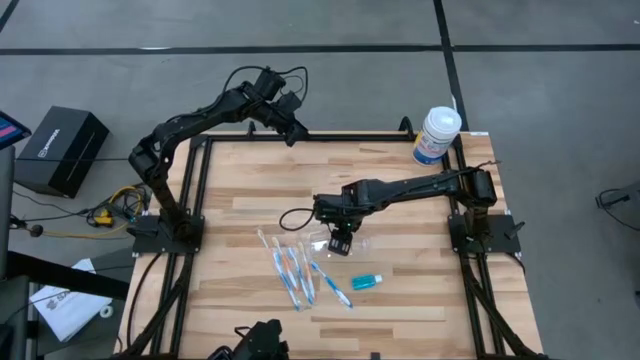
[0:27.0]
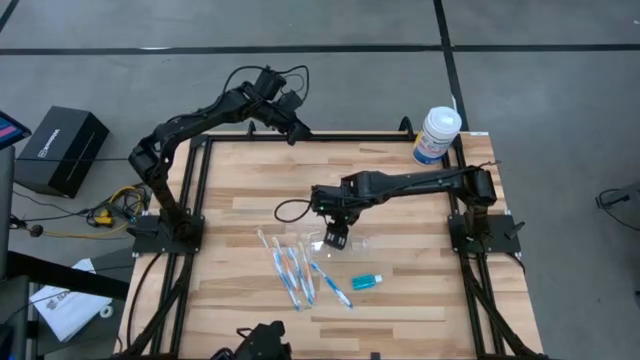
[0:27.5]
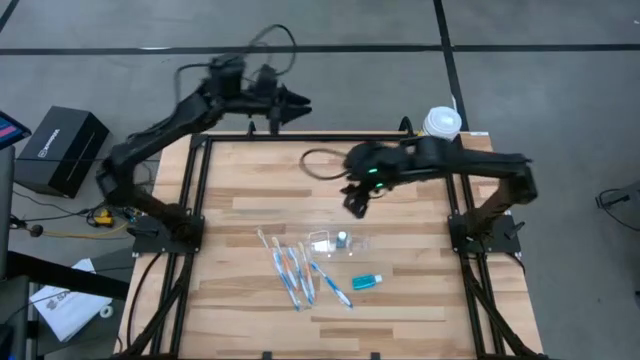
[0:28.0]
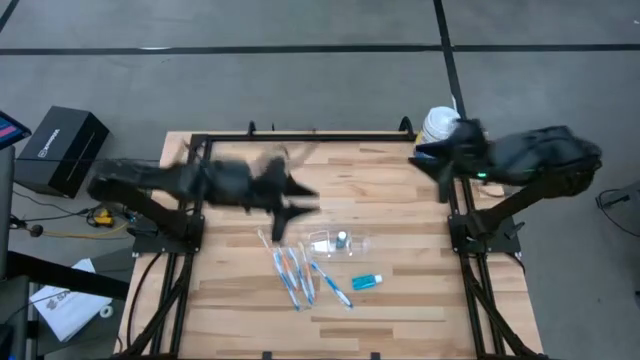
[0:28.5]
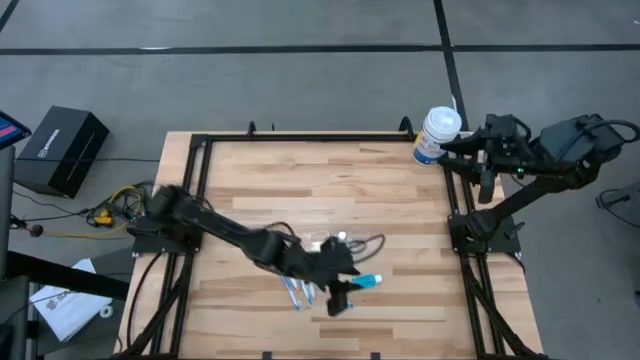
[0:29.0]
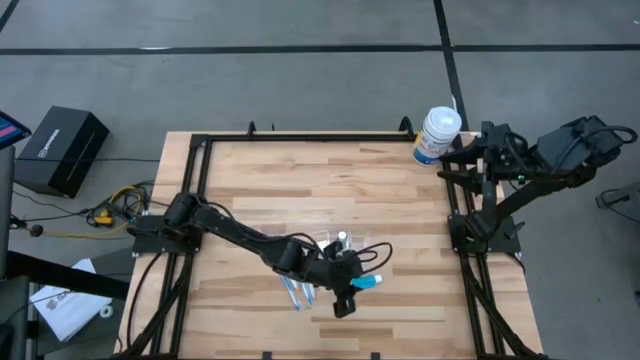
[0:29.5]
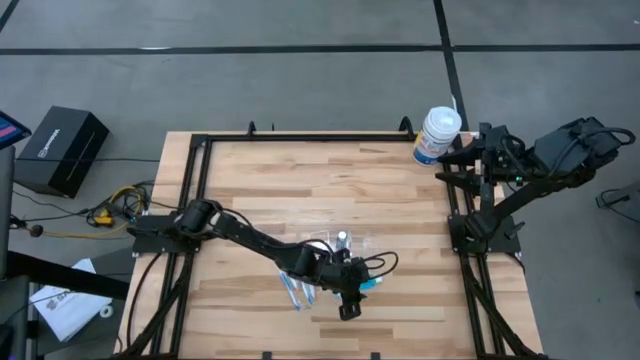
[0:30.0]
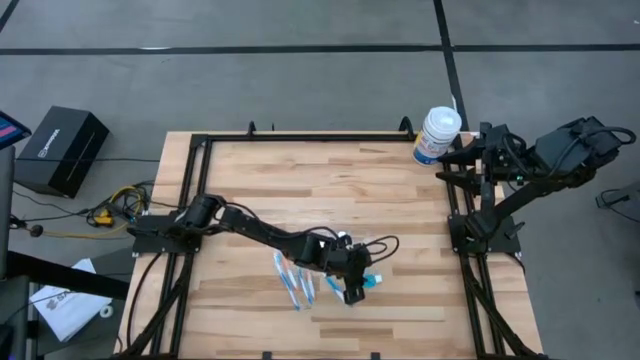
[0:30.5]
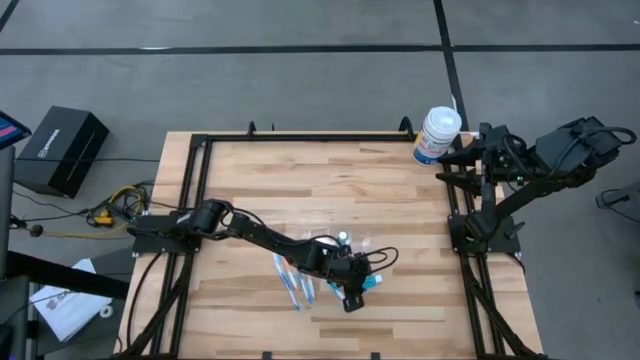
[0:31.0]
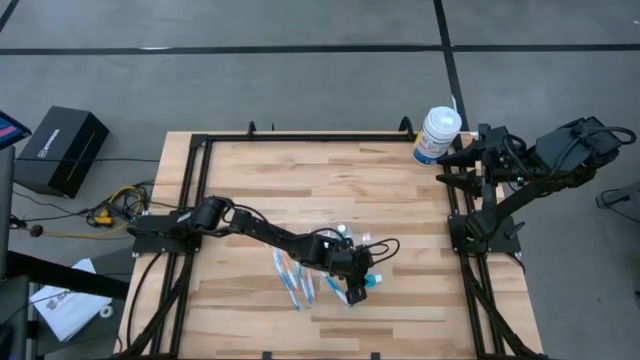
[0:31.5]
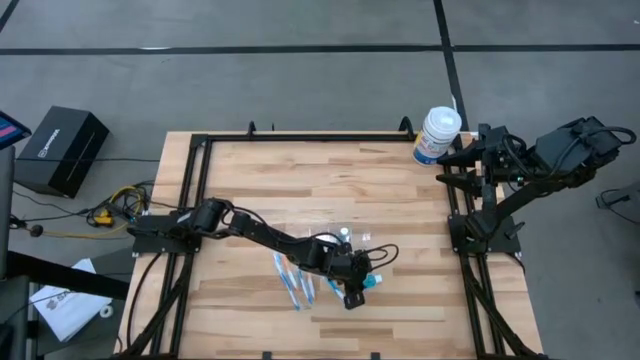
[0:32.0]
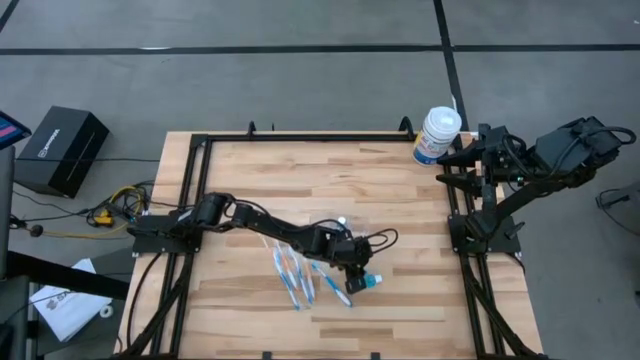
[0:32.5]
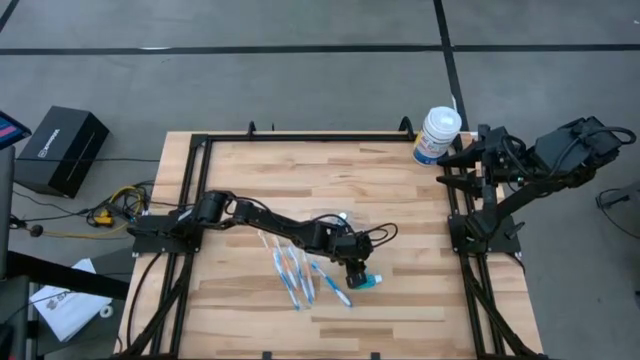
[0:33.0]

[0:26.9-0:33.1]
Task: Pick & Place toothbrushing station
Adjust the transparent organizer

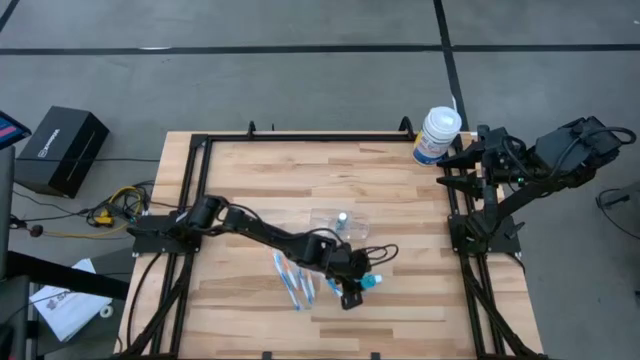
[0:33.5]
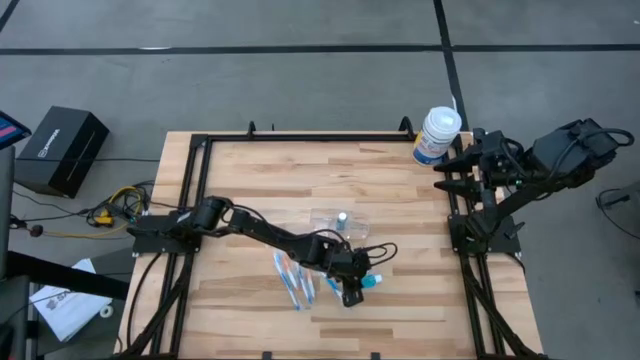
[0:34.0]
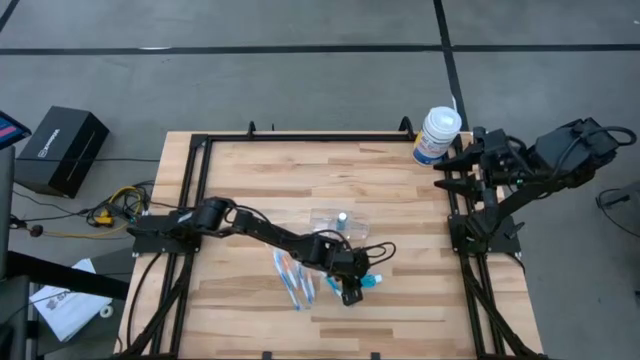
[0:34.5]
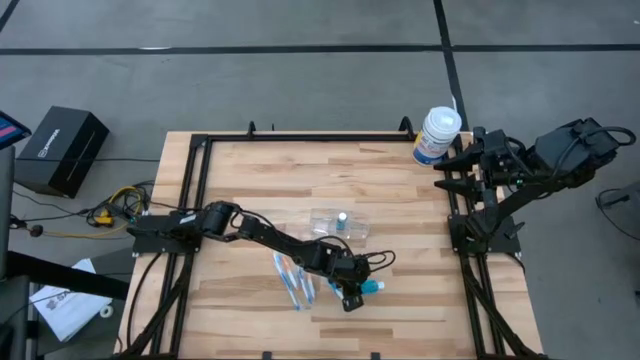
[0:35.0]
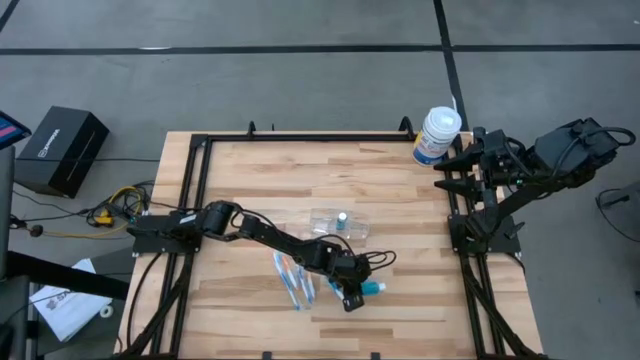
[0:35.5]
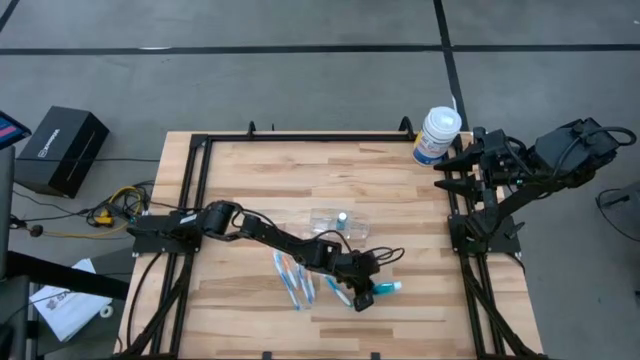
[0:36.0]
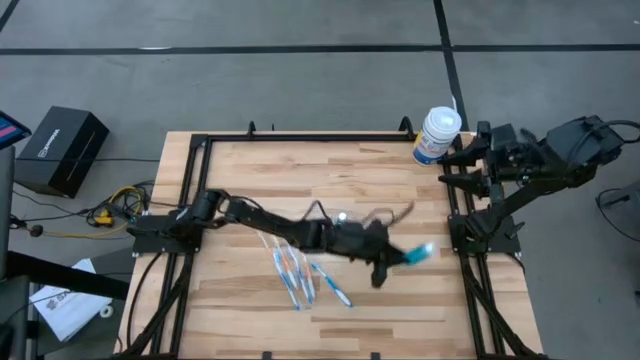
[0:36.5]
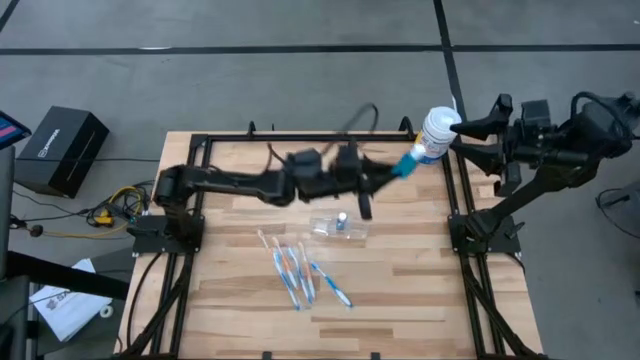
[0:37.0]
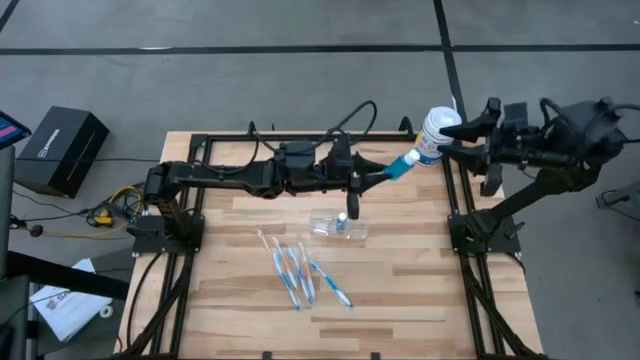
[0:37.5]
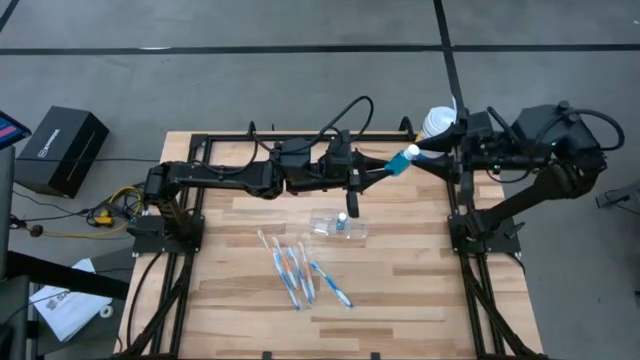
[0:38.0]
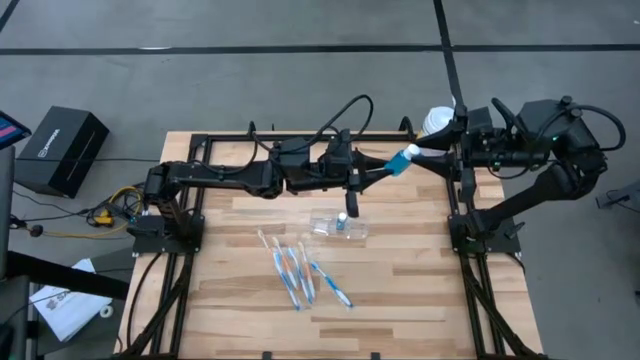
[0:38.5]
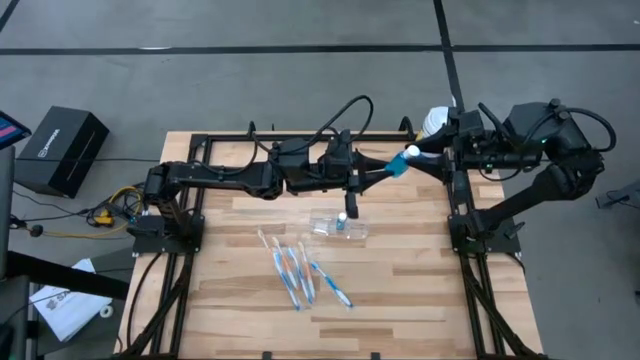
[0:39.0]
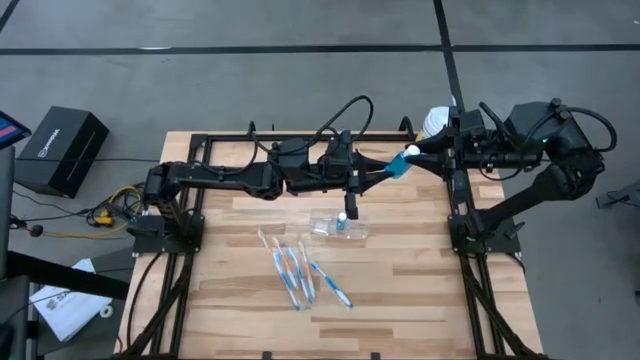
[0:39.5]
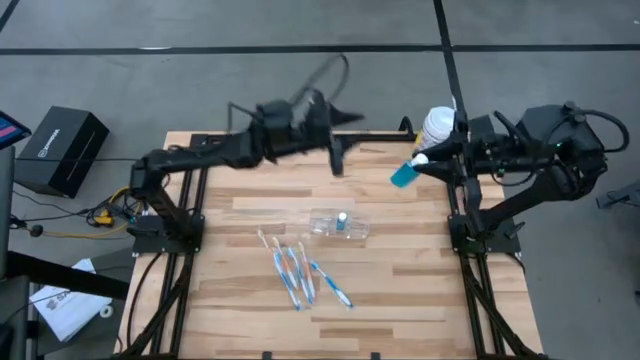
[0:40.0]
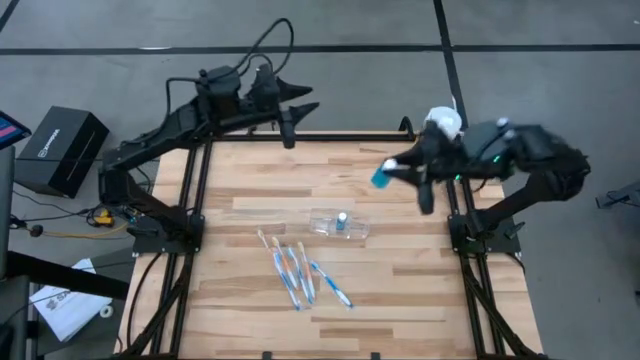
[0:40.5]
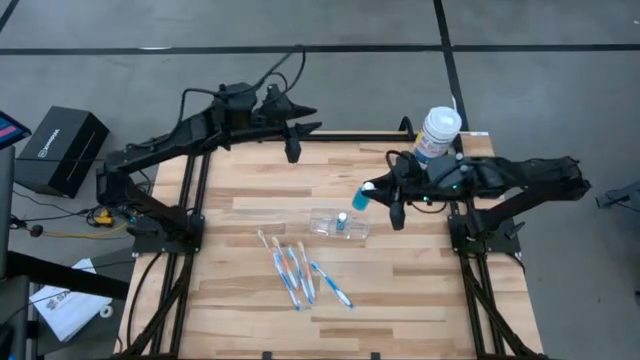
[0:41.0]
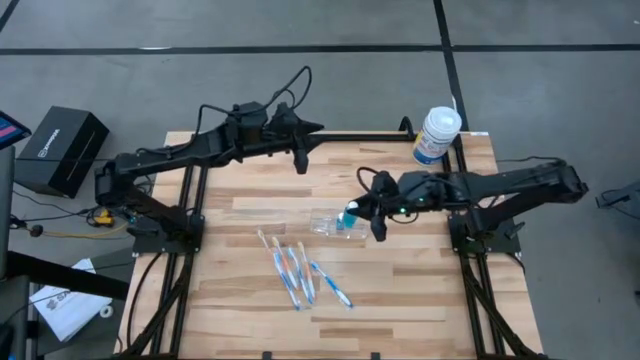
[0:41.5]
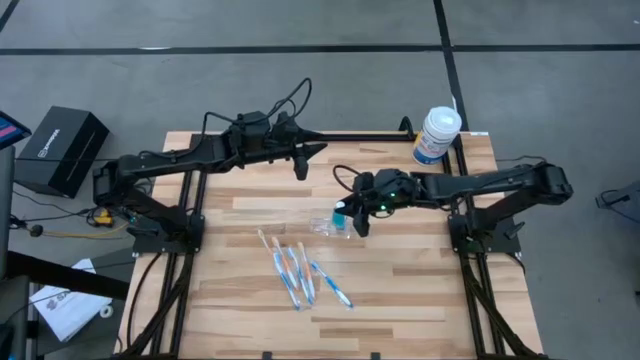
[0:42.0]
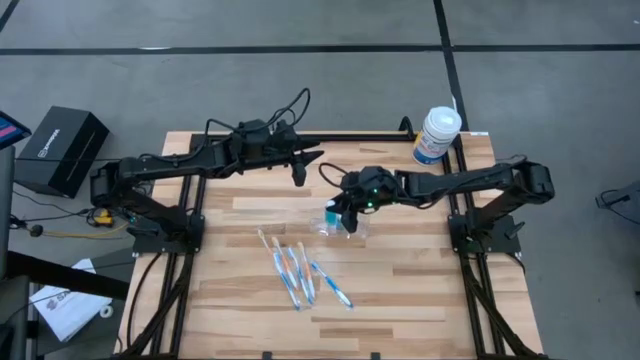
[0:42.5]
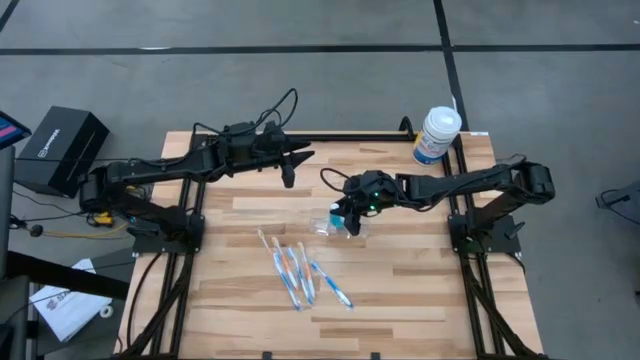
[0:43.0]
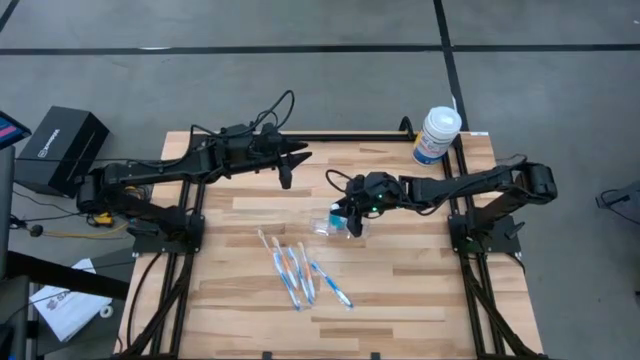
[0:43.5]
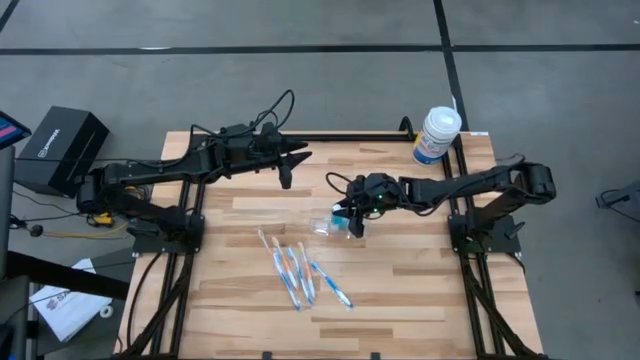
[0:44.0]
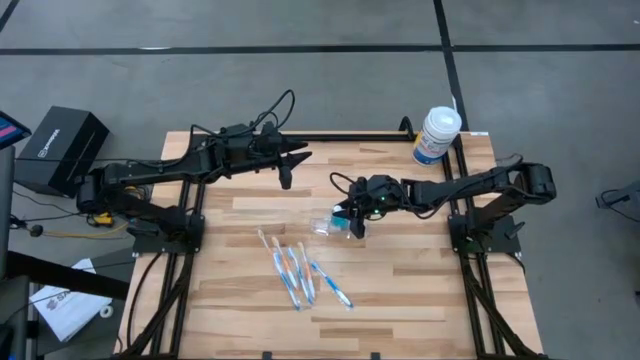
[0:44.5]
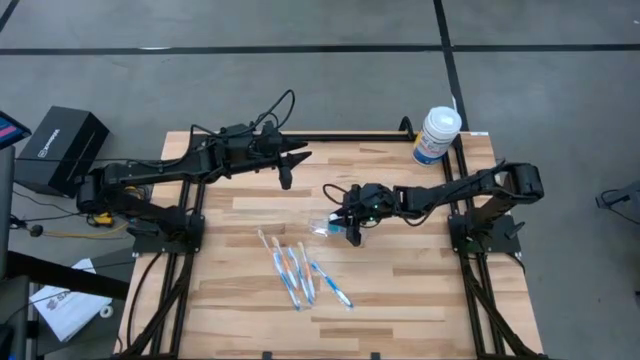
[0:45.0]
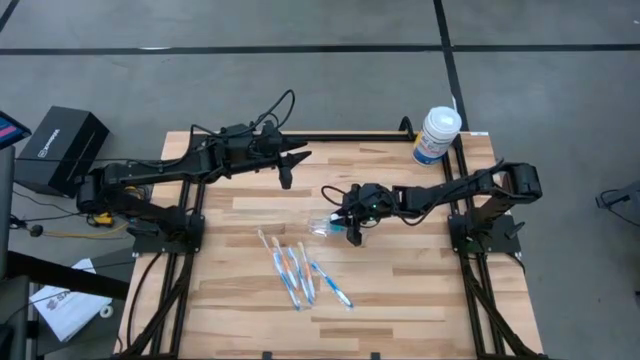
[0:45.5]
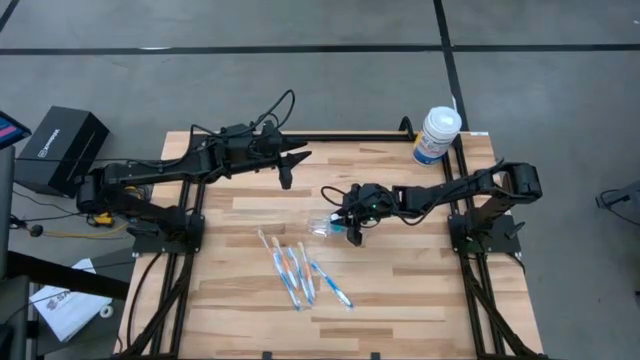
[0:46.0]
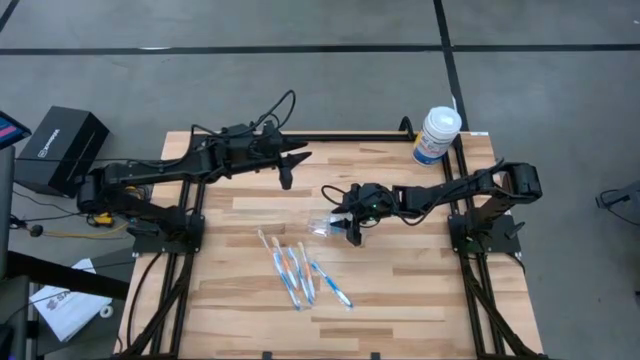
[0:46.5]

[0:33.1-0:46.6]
Put the blue mouthwash into the transparent organizer

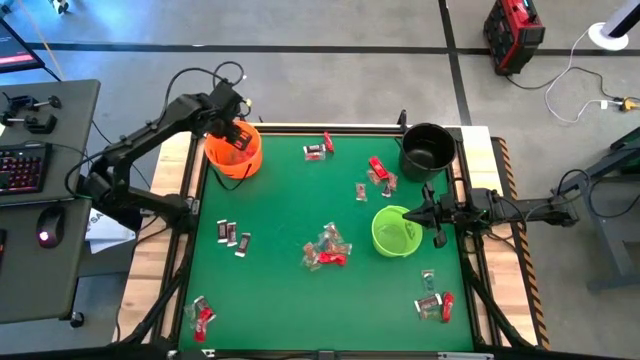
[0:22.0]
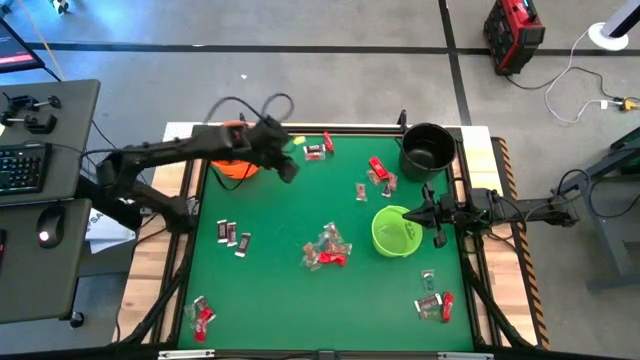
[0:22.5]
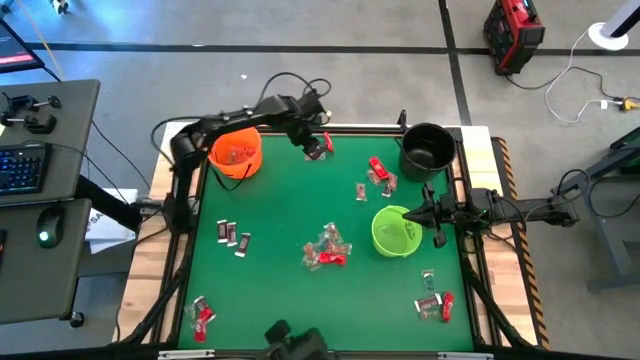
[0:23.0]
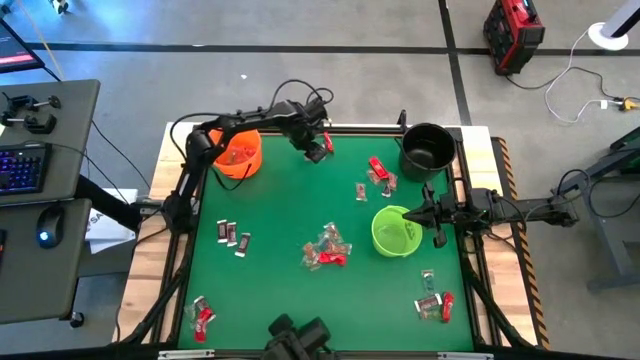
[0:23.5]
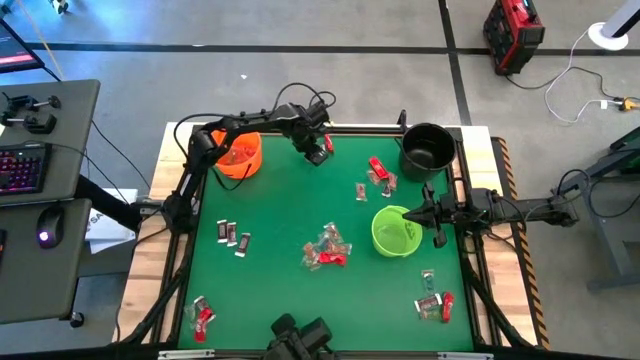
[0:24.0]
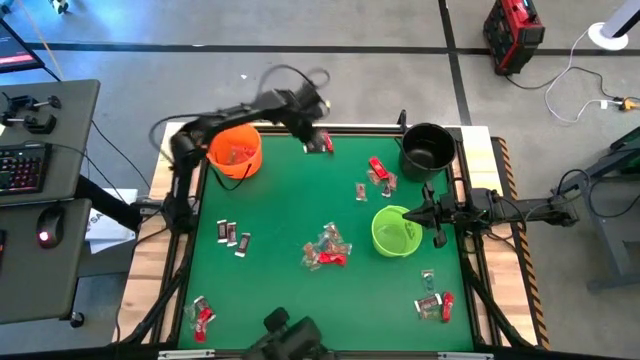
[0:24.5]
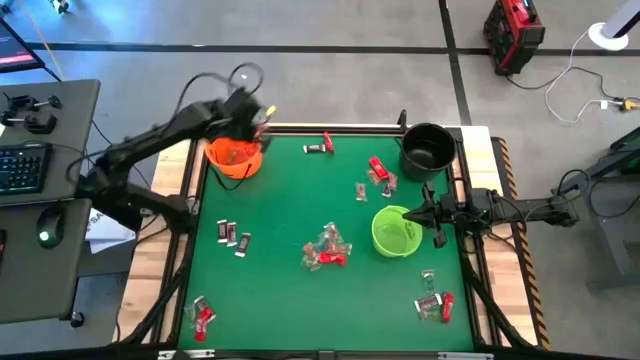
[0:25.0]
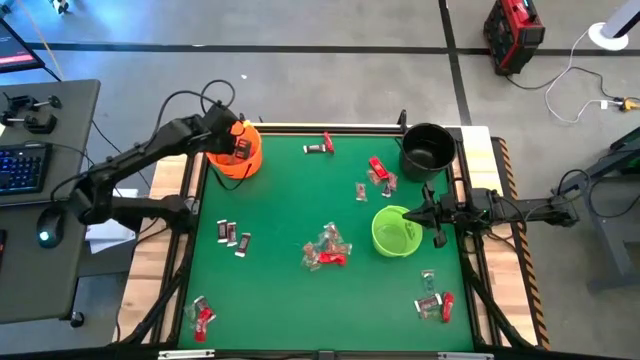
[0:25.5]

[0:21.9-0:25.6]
Task: Sort candy by brand, put in halloween buckets
Put the red gummy into the orange bucket
